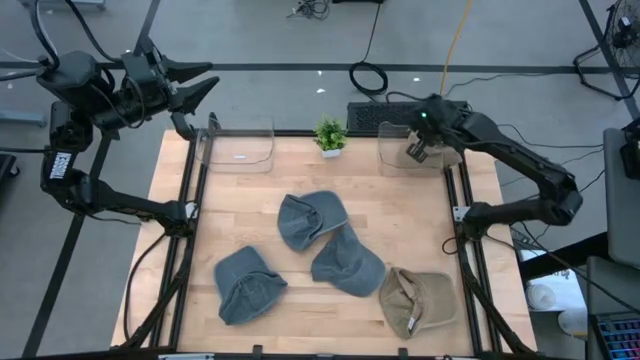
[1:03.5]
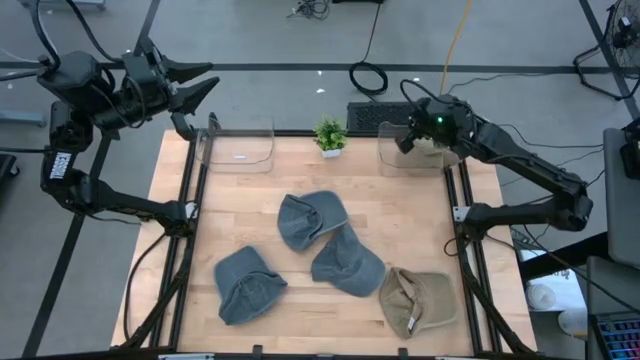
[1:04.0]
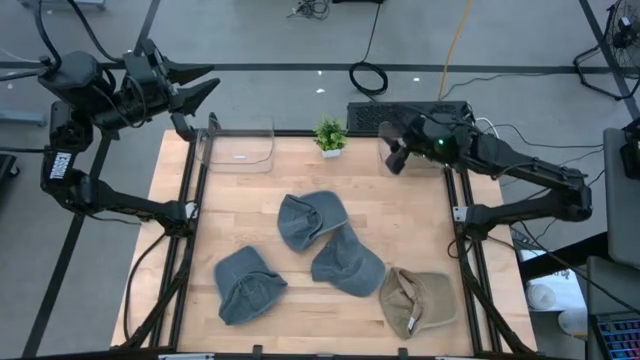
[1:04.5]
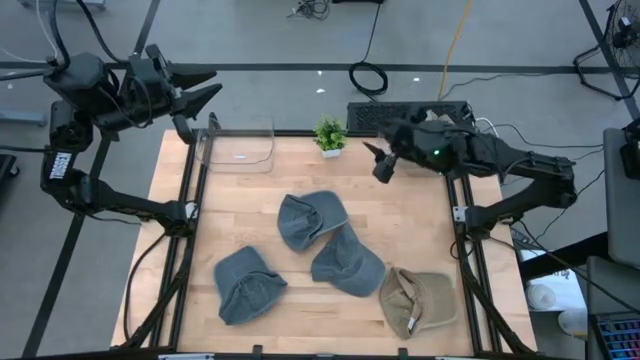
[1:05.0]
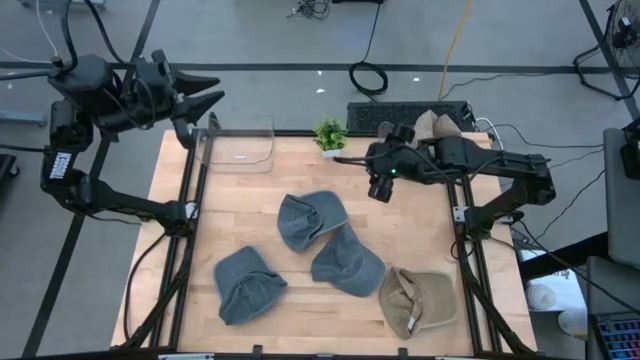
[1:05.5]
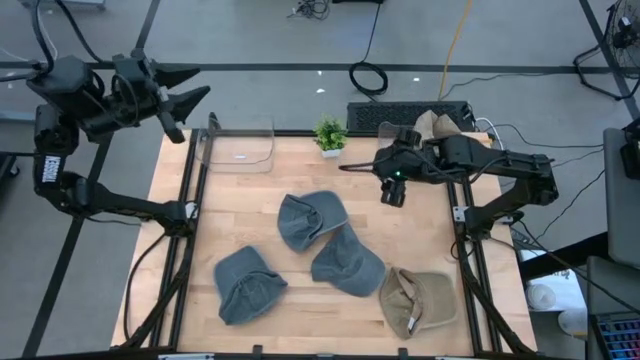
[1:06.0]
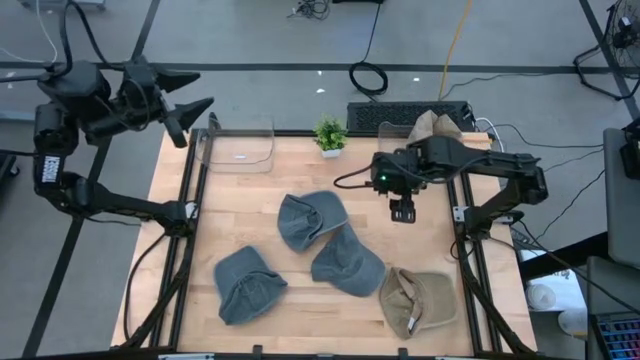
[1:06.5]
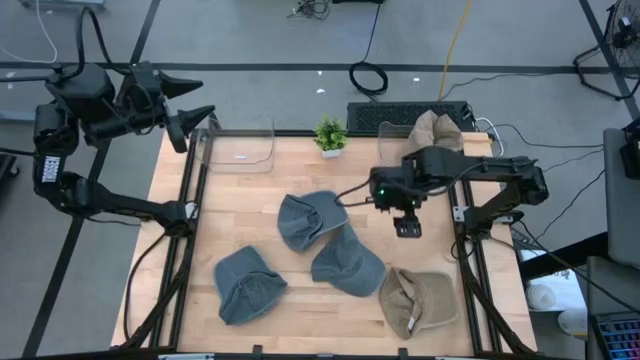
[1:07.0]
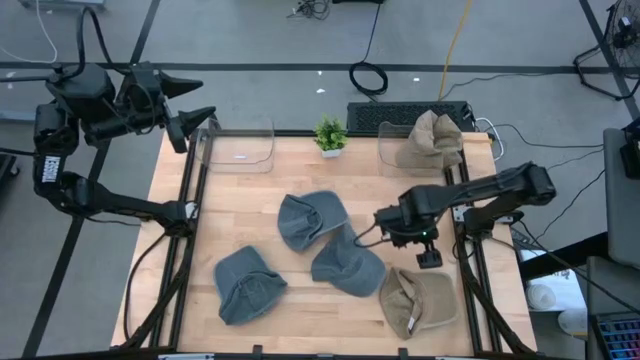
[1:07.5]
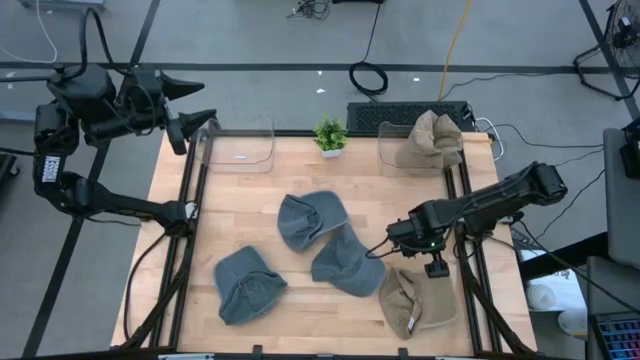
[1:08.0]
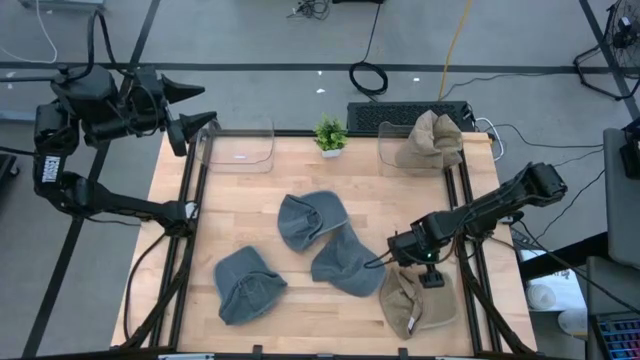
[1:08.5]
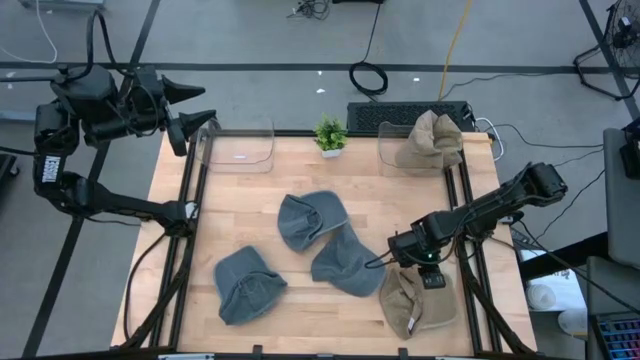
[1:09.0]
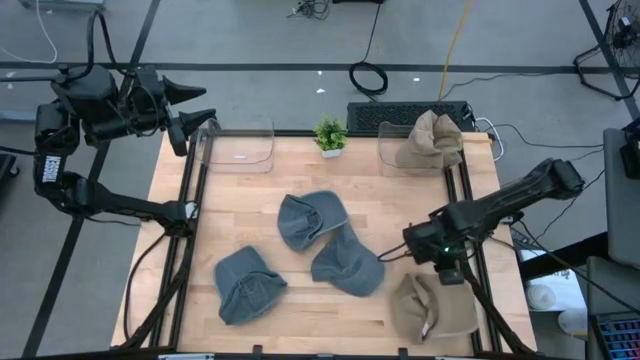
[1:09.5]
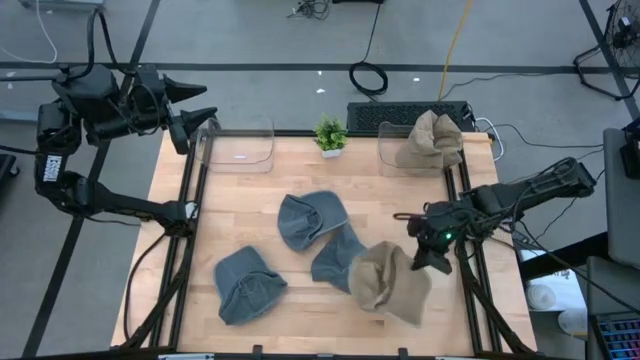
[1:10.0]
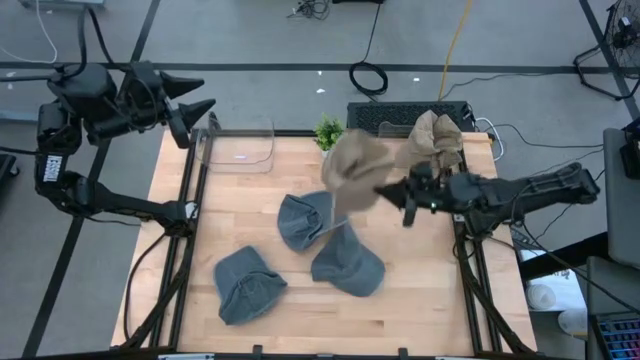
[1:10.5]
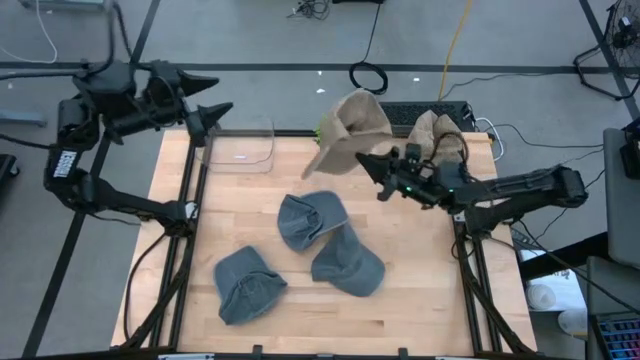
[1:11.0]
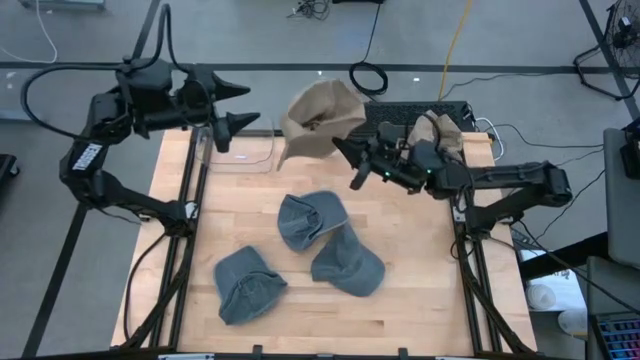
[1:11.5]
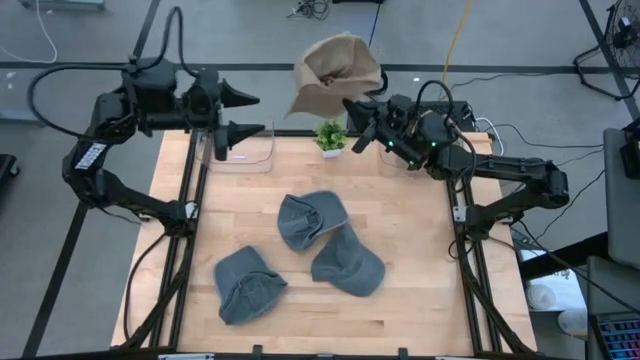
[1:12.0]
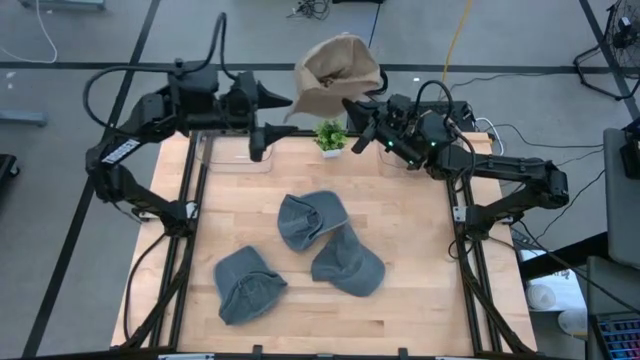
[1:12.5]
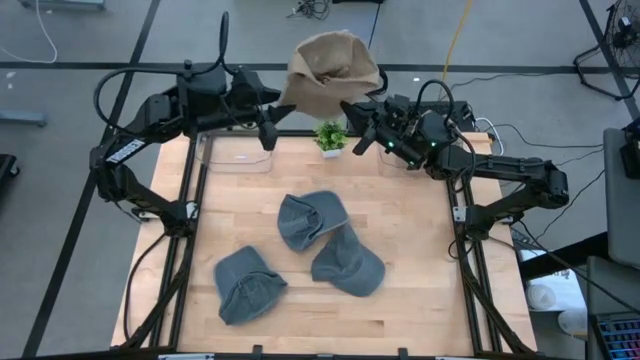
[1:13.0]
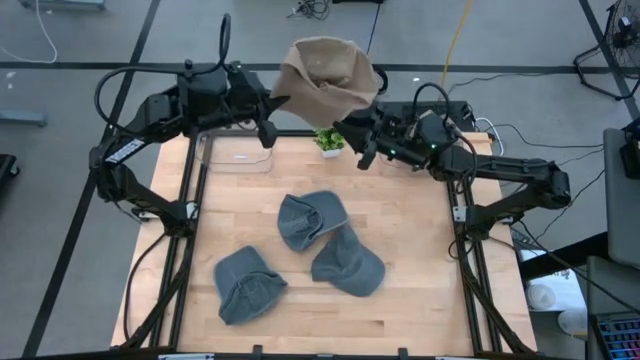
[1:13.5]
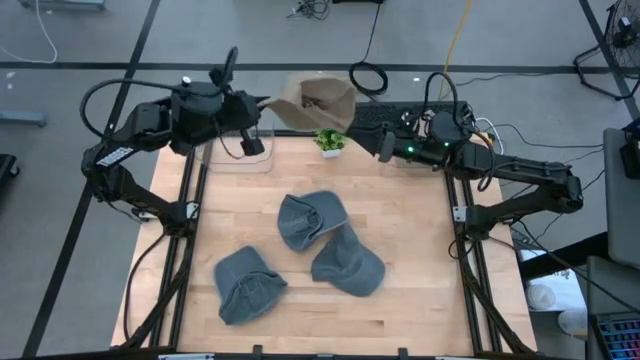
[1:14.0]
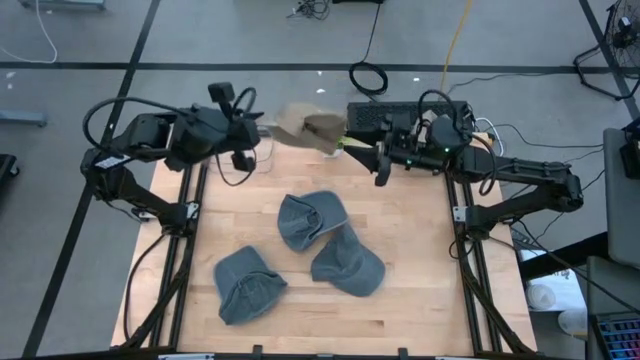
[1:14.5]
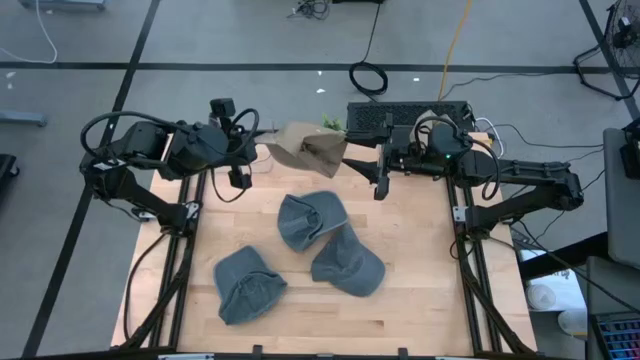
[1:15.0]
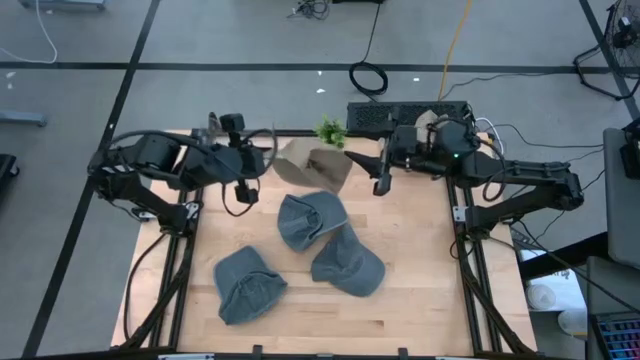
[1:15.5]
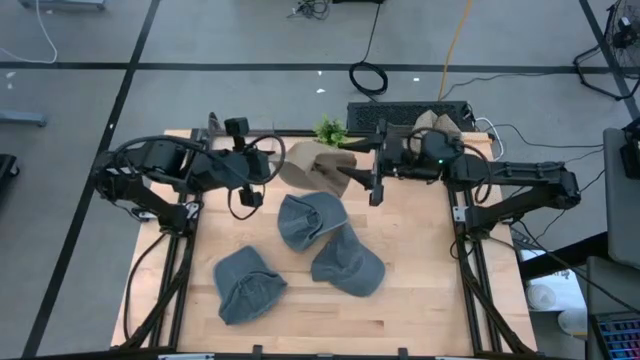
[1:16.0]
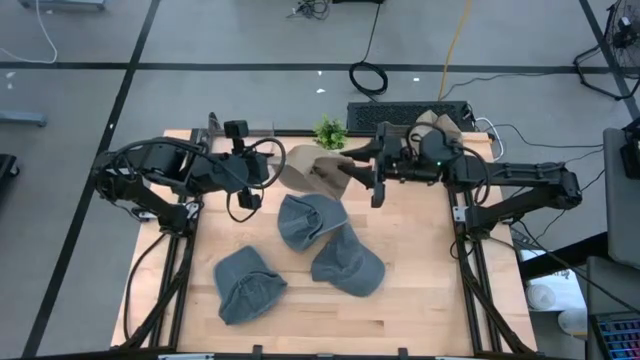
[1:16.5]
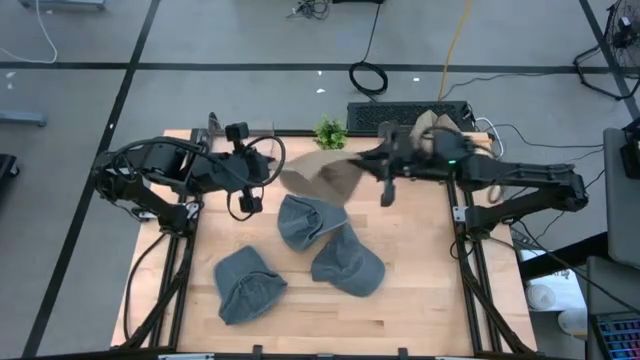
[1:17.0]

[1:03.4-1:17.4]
Task: Pick & Place hat
Put the brown cap into the right transparent bin
